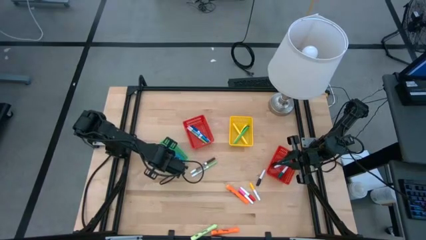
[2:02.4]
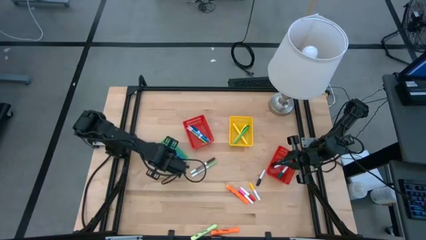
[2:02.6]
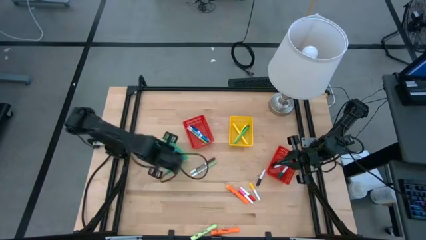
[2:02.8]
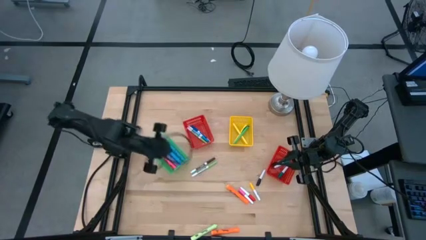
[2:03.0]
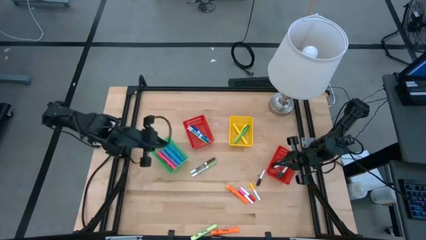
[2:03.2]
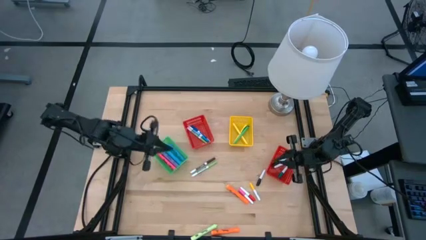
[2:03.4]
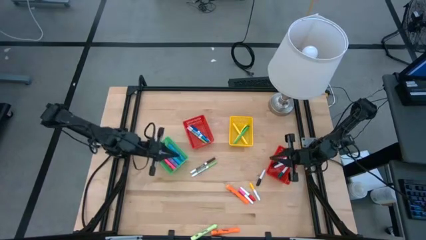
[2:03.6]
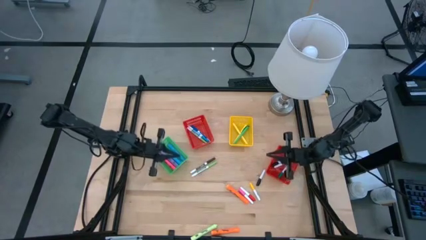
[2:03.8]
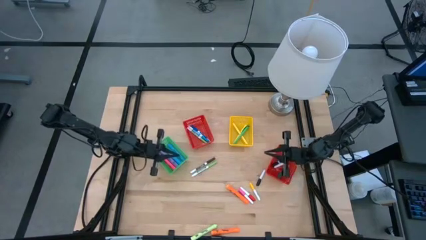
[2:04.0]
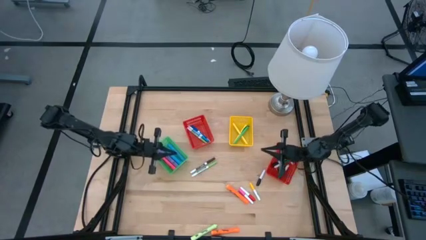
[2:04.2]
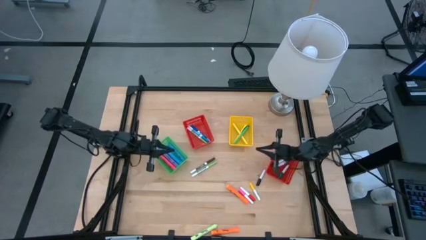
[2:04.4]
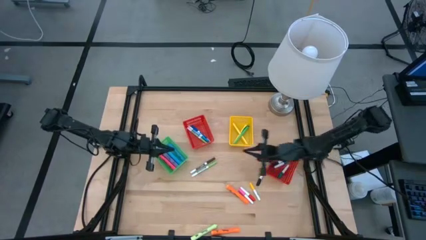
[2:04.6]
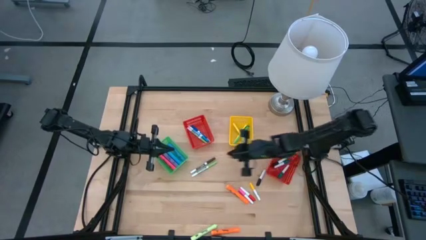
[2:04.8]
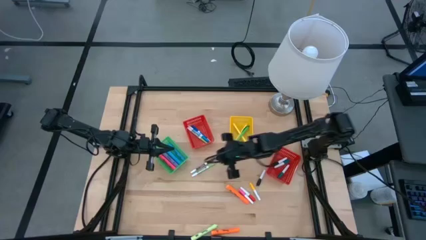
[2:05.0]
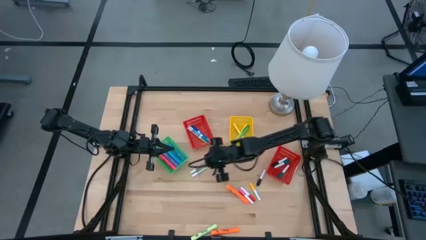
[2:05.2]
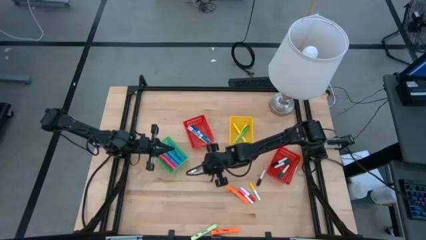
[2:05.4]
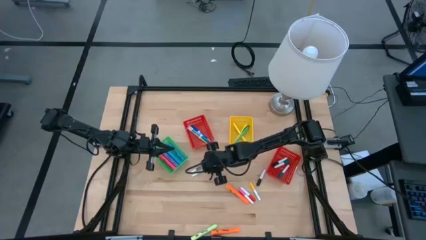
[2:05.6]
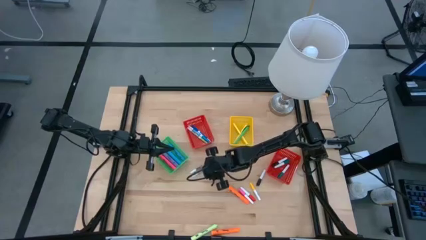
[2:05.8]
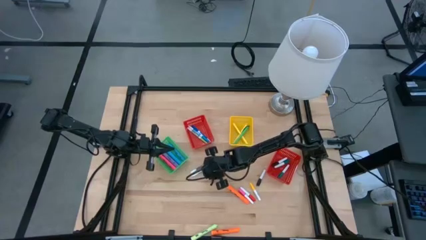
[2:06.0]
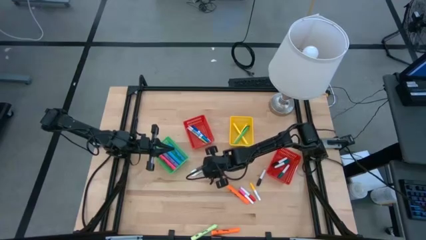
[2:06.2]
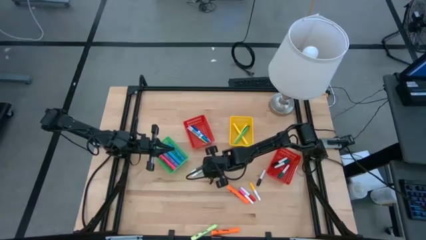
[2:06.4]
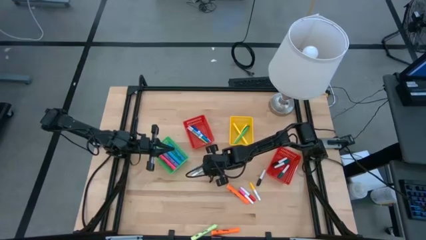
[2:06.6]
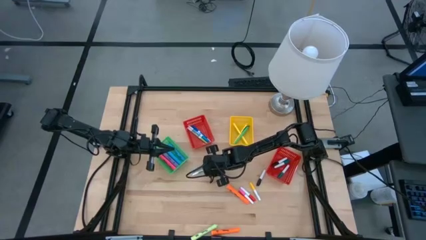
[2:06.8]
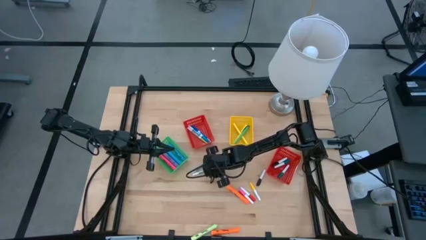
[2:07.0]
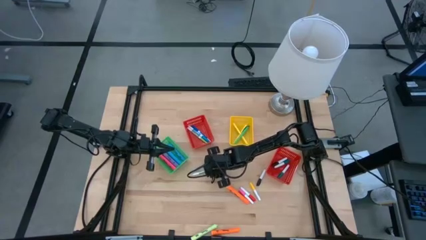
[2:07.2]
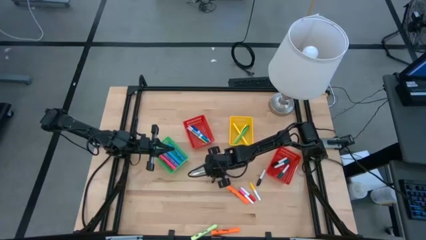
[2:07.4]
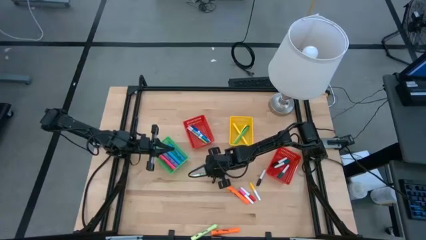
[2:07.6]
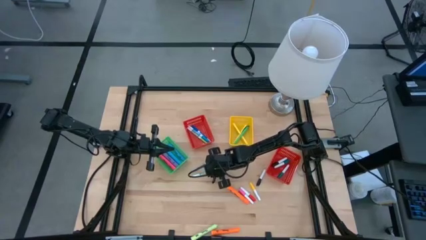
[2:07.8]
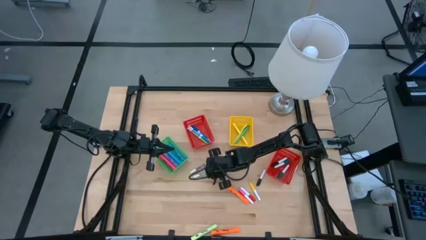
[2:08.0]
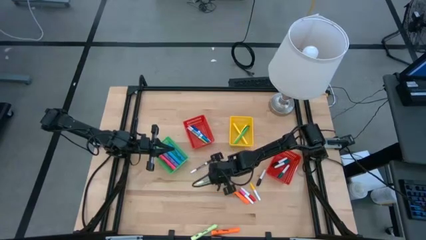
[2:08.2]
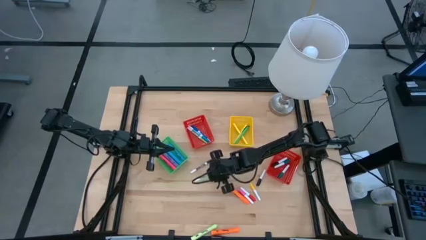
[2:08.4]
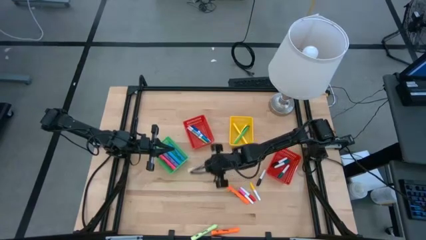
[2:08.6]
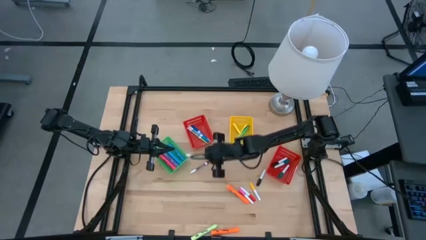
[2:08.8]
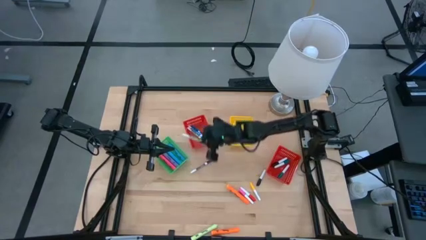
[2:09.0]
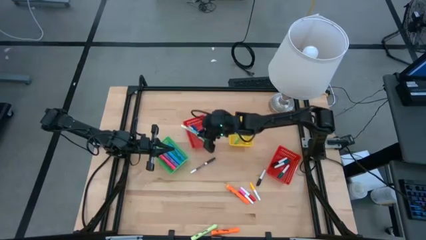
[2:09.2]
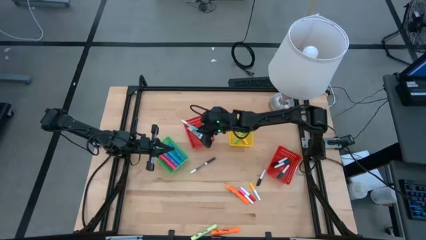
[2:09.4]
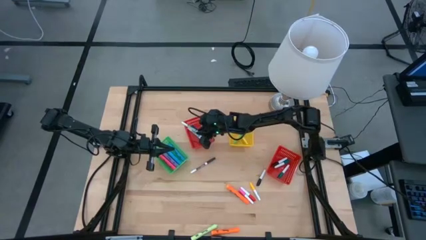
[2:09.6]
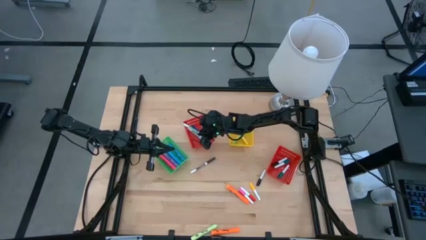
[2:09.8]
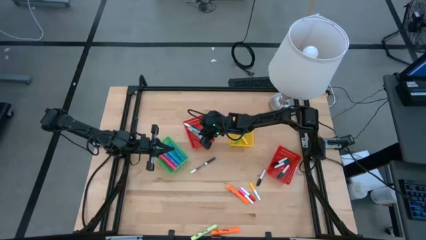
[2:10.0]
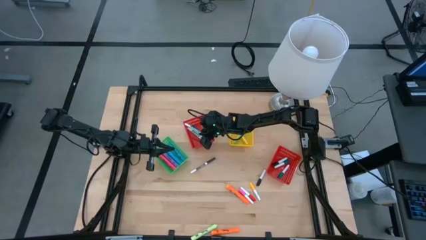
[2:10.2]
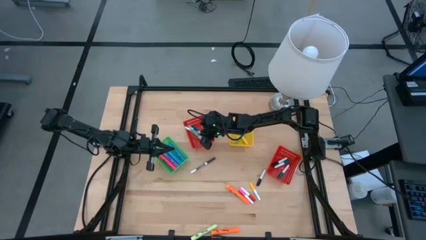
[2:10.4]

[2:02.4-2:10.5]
Task: Pick & Place Markers
Put the green marker pen into the left red bin

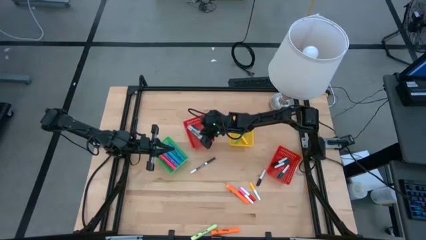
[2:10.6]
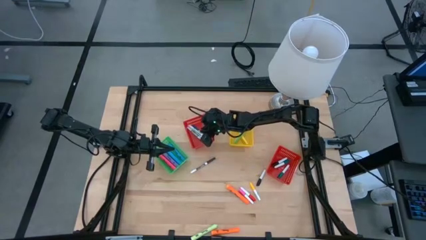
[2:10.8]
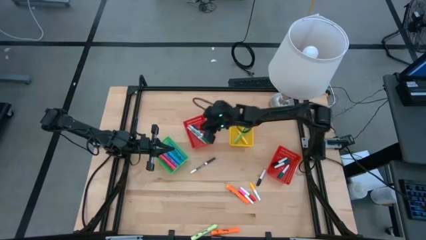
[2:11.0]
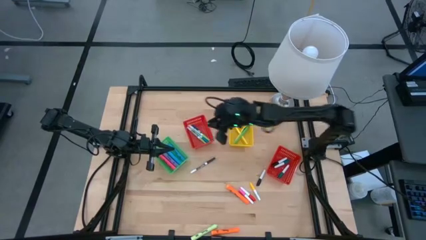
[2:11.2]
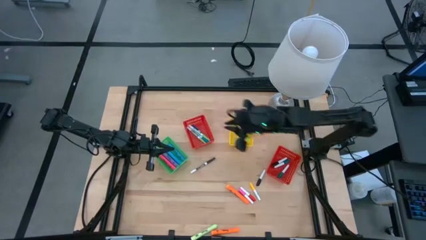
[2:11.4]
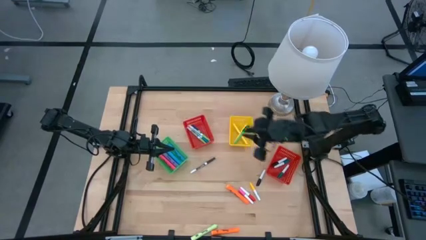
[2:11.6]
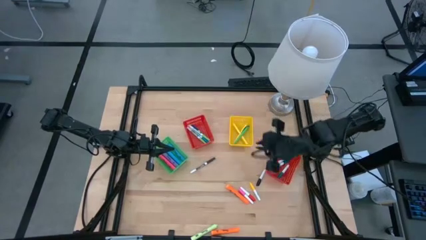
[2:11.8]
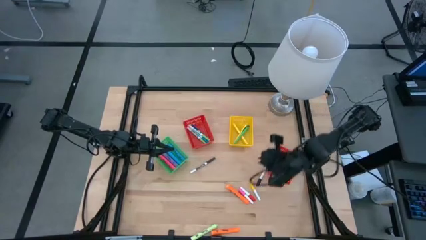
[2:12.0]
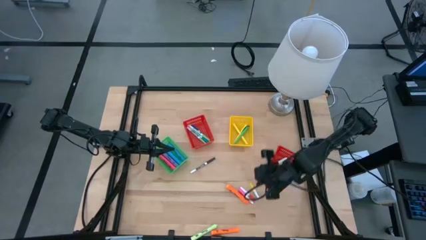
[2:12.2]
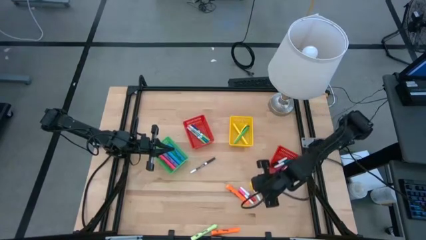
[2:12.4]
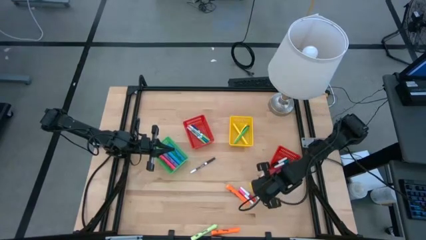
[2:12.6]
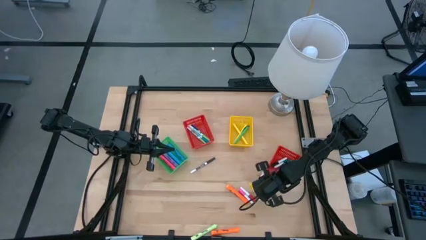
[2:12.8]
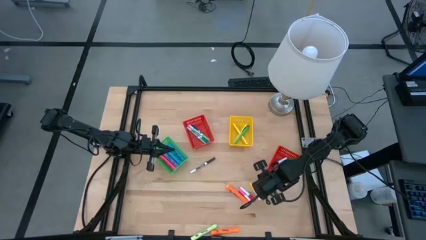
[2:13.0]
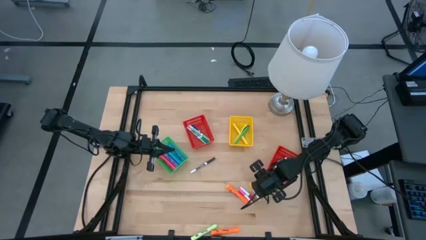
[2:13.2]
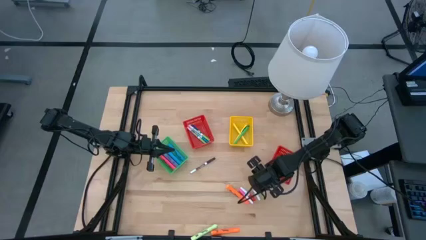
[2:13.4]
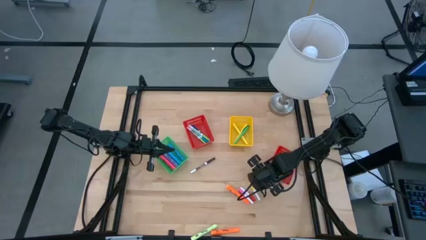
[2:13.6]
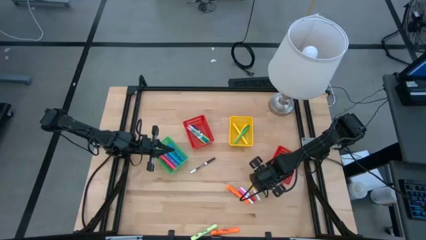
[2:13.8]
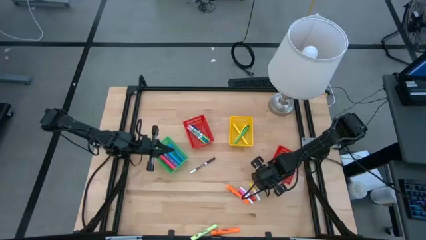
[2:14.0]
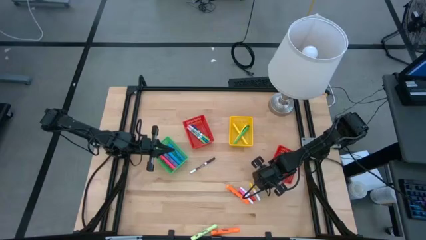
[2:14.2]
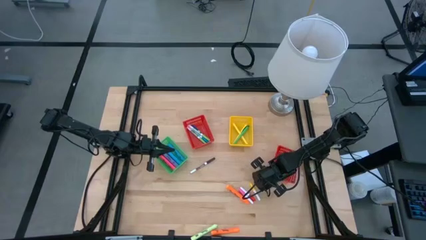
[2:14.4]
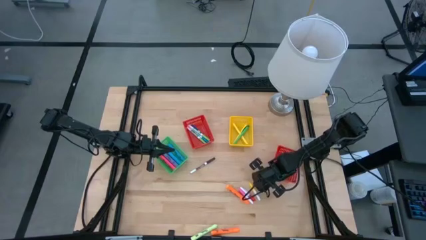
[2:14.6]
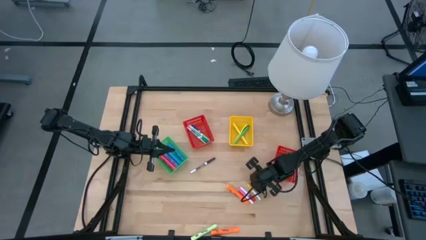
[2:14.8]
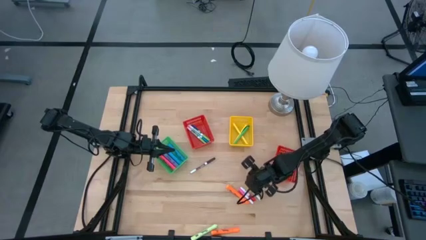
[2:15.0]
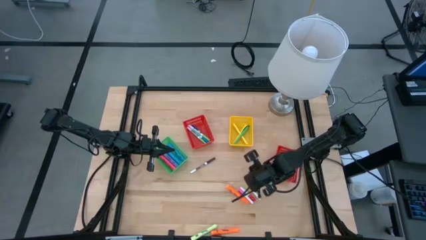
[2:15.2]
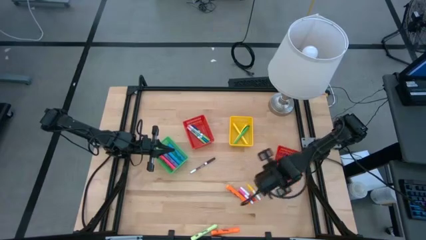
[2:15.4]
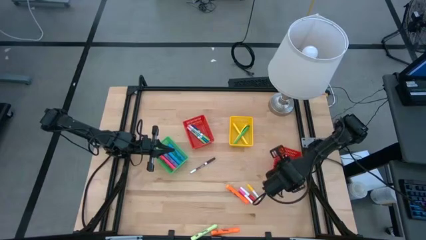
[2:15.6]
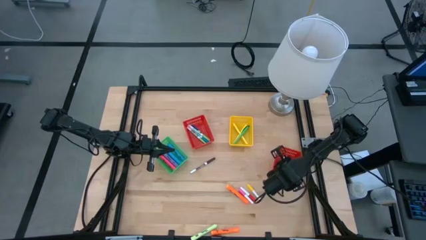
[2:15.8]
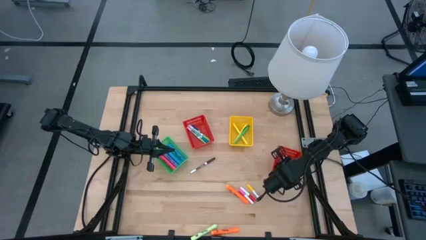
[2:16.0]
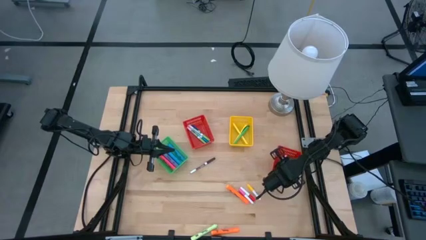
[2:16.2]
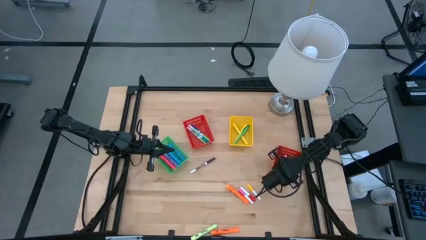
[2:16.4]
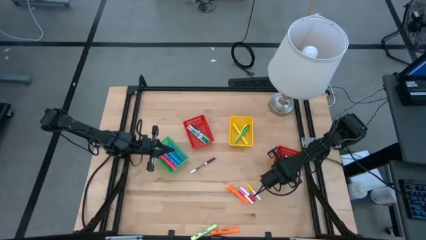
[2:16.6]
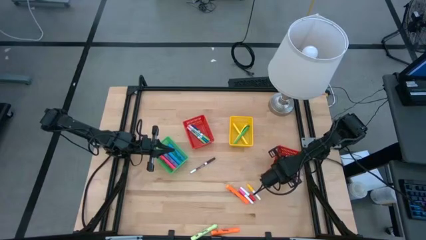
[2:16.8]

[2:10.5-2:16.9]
Put the small black highlighter pen into the right red bin
